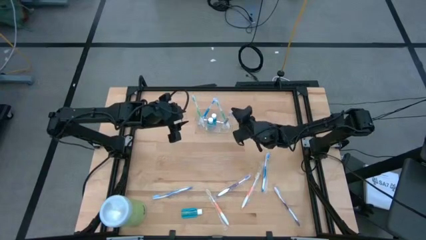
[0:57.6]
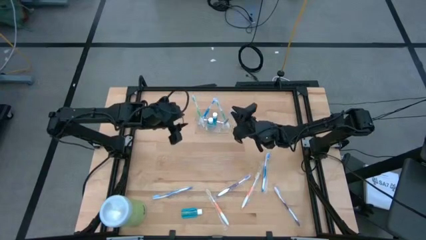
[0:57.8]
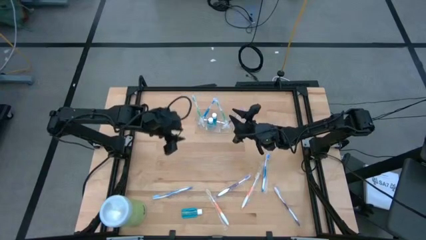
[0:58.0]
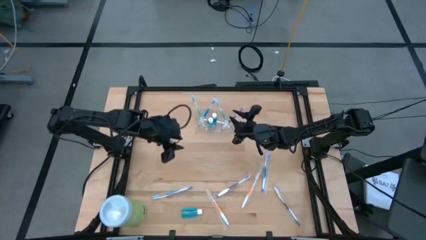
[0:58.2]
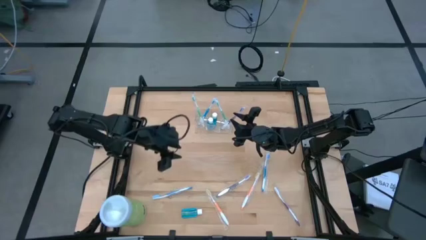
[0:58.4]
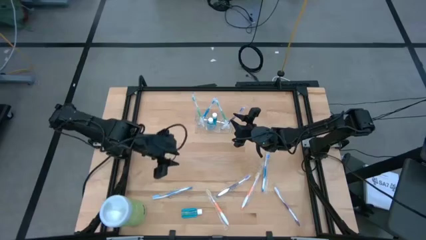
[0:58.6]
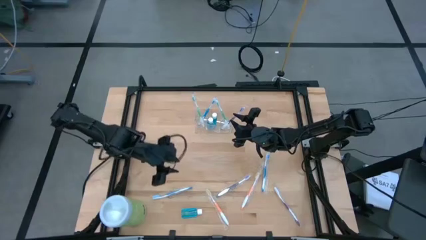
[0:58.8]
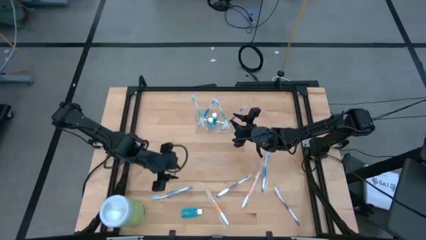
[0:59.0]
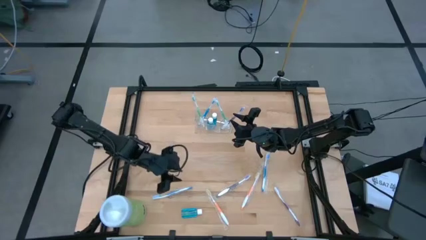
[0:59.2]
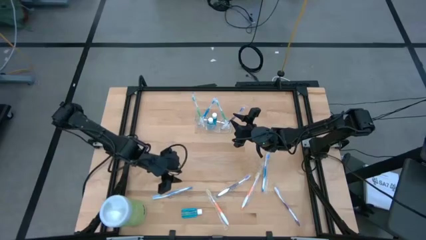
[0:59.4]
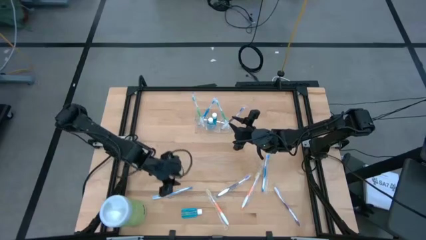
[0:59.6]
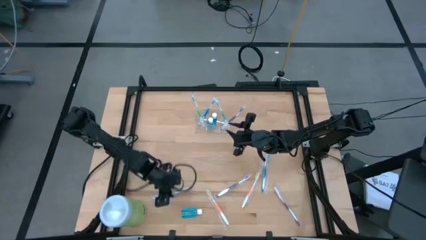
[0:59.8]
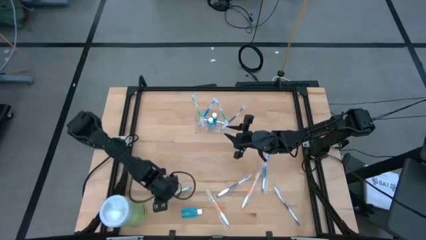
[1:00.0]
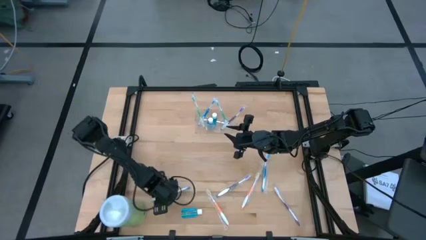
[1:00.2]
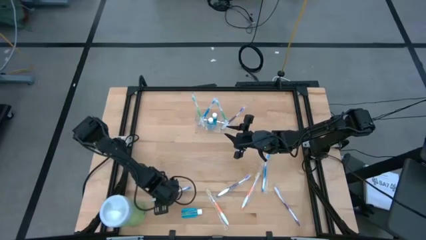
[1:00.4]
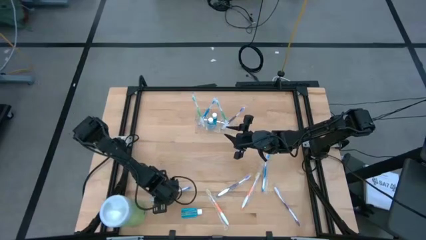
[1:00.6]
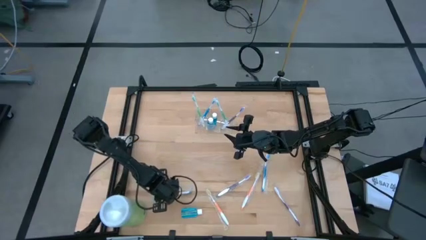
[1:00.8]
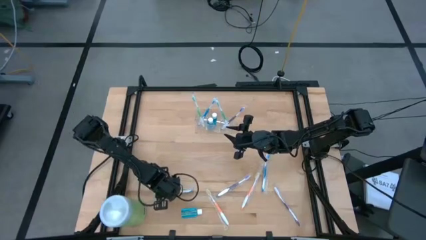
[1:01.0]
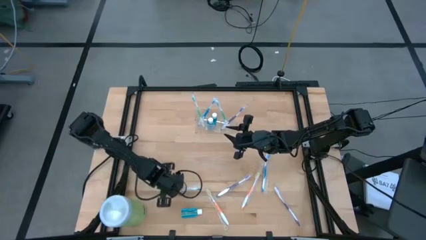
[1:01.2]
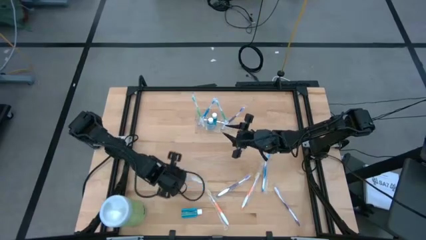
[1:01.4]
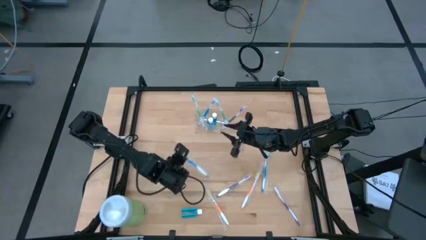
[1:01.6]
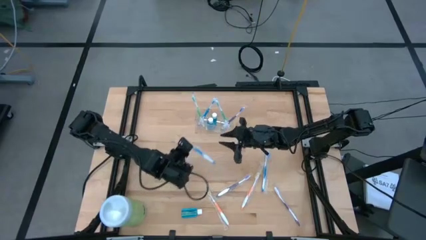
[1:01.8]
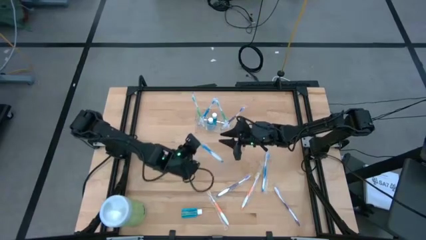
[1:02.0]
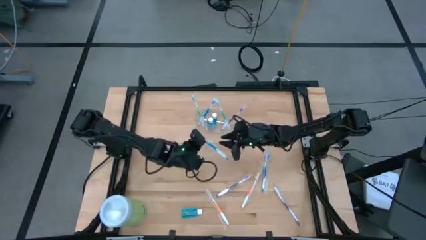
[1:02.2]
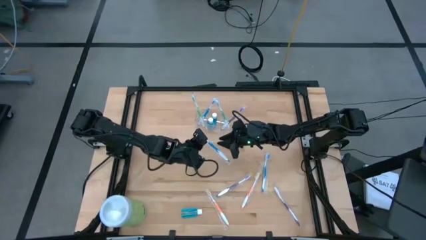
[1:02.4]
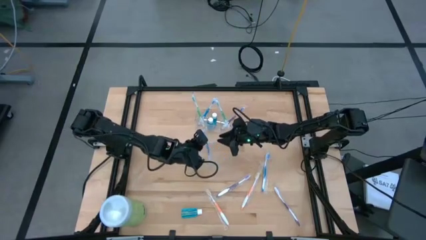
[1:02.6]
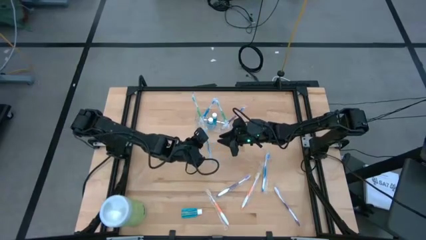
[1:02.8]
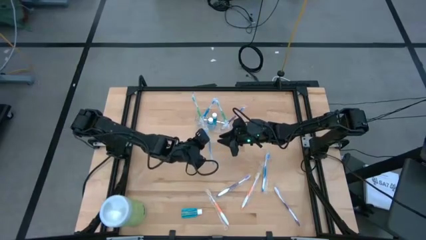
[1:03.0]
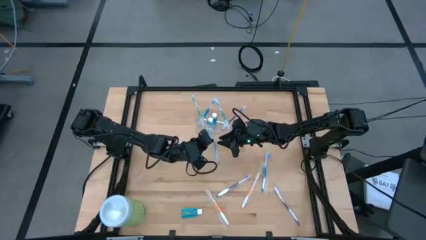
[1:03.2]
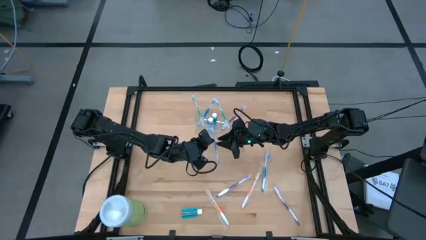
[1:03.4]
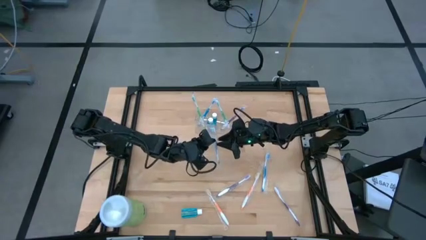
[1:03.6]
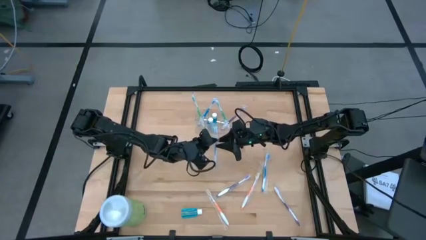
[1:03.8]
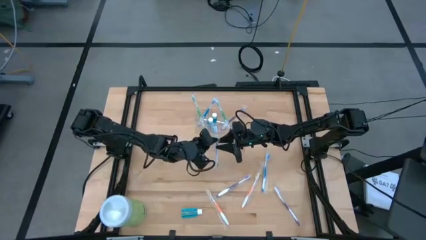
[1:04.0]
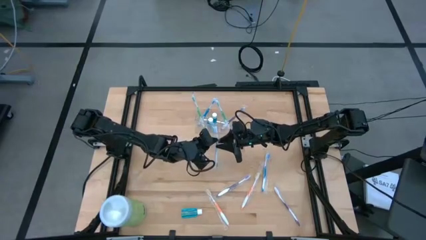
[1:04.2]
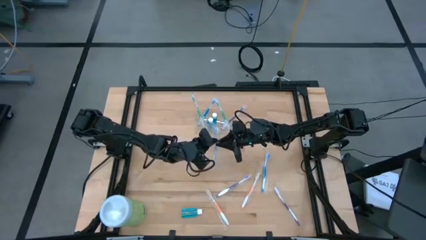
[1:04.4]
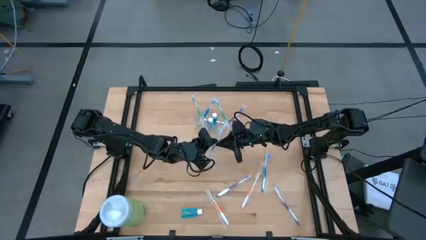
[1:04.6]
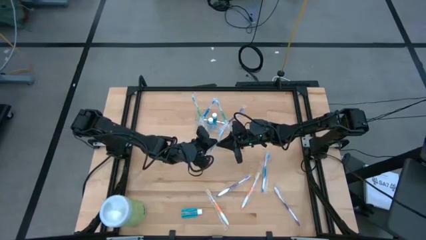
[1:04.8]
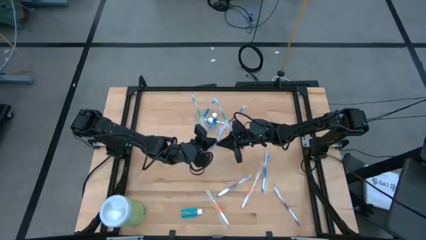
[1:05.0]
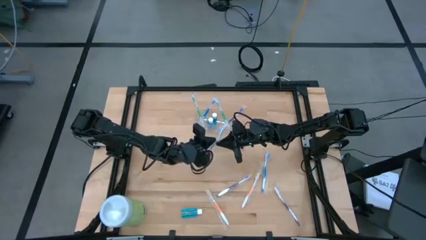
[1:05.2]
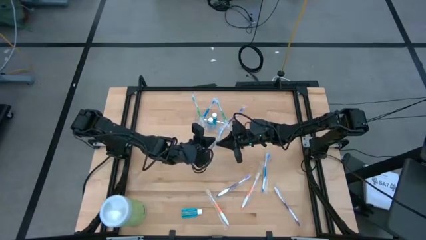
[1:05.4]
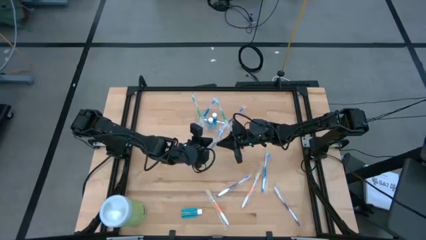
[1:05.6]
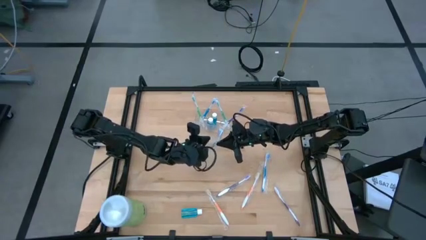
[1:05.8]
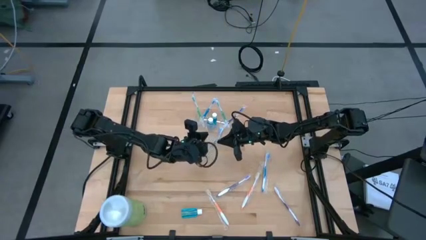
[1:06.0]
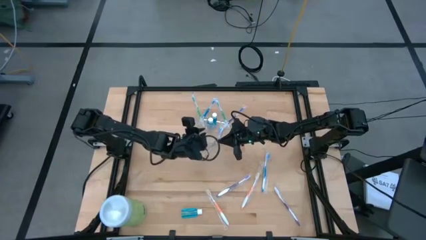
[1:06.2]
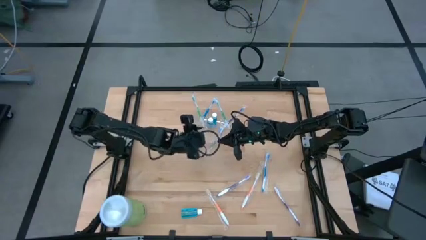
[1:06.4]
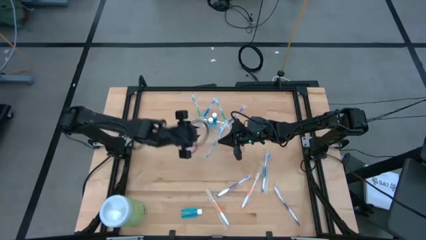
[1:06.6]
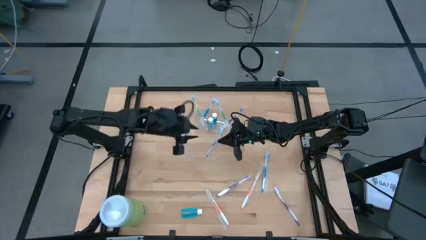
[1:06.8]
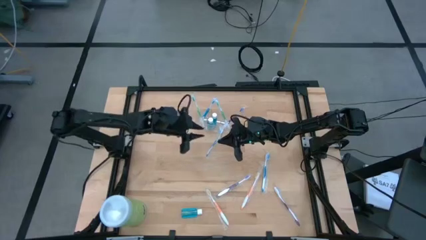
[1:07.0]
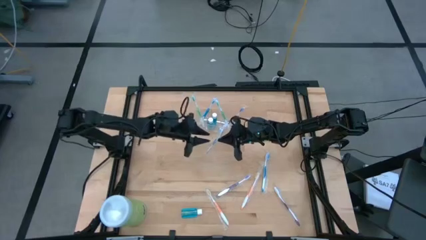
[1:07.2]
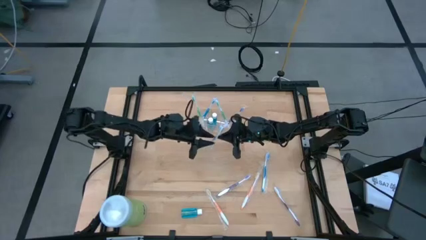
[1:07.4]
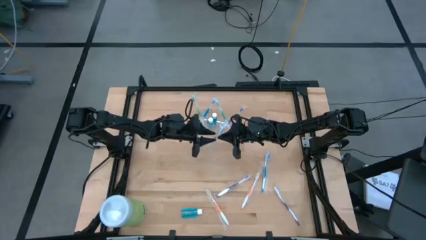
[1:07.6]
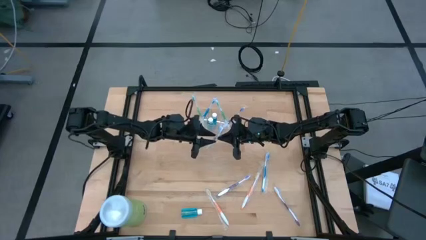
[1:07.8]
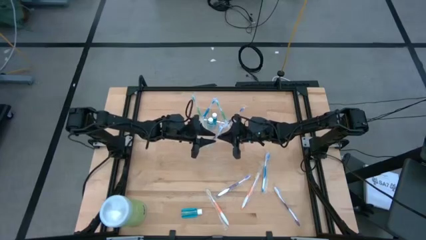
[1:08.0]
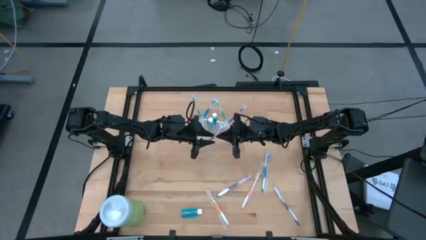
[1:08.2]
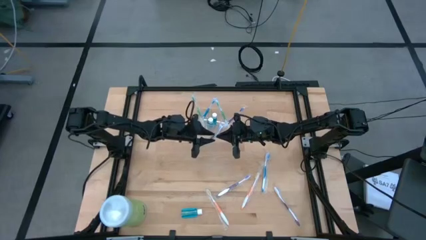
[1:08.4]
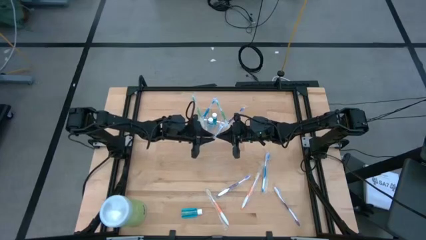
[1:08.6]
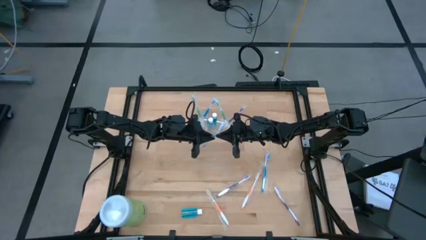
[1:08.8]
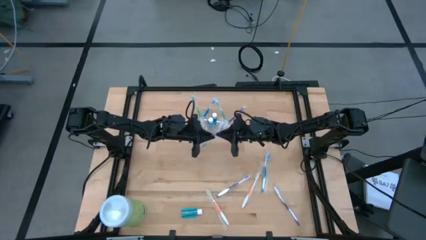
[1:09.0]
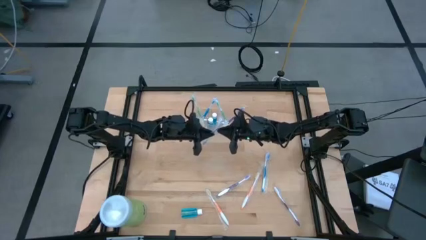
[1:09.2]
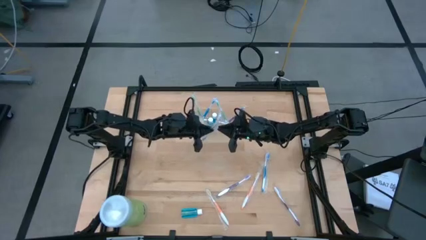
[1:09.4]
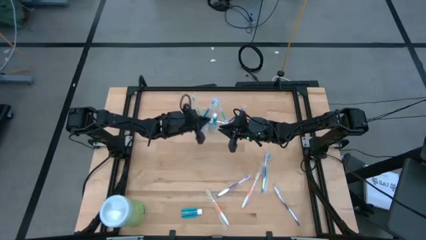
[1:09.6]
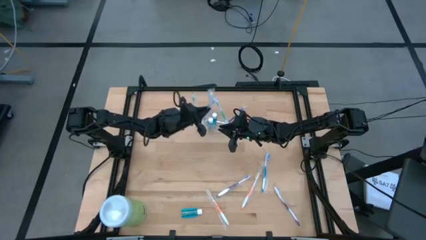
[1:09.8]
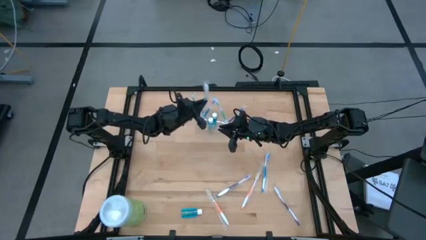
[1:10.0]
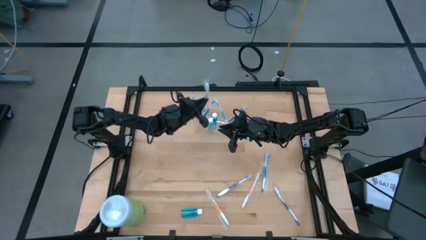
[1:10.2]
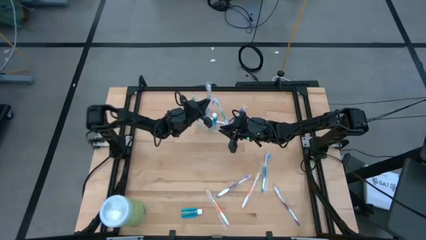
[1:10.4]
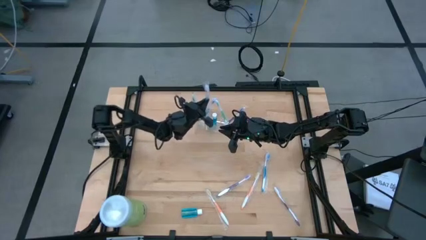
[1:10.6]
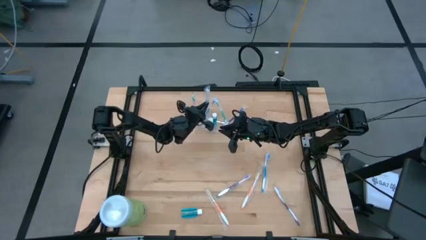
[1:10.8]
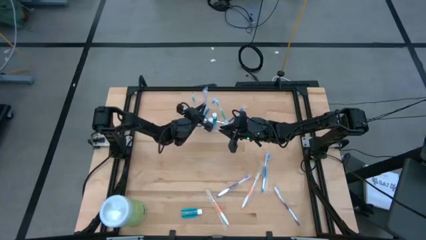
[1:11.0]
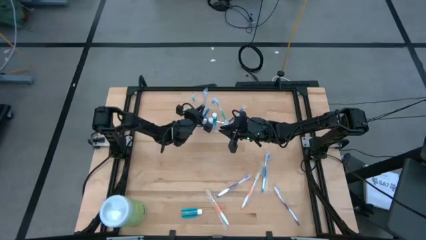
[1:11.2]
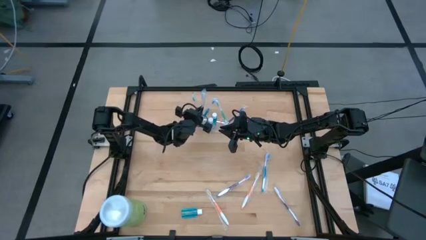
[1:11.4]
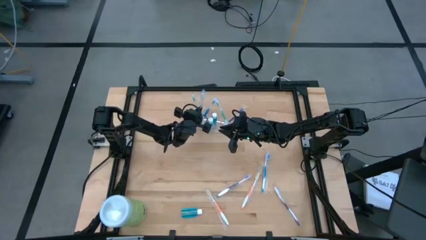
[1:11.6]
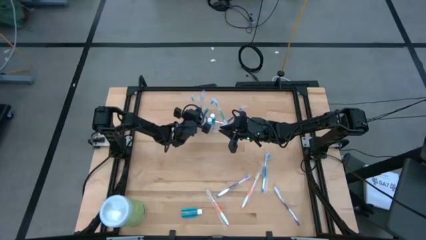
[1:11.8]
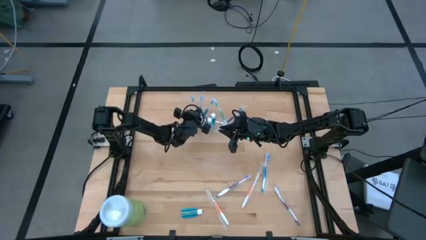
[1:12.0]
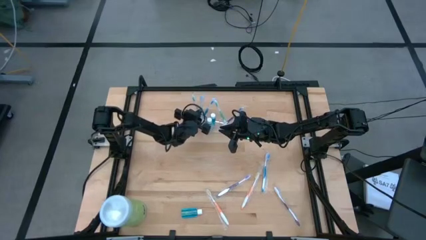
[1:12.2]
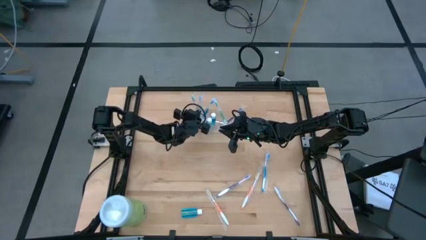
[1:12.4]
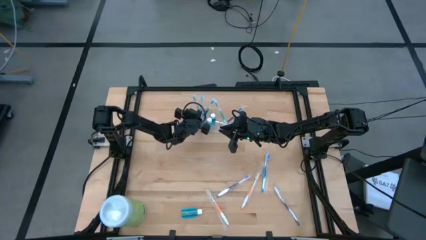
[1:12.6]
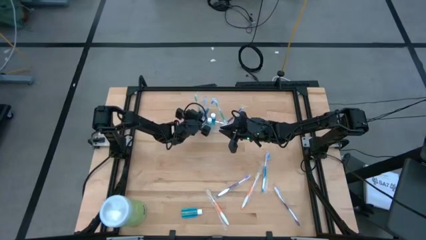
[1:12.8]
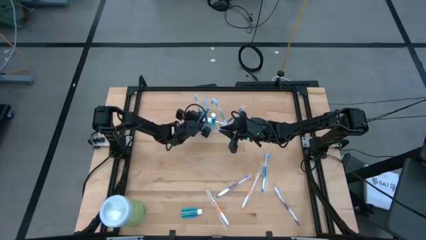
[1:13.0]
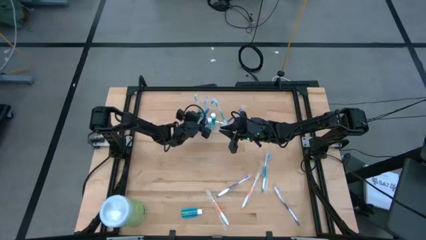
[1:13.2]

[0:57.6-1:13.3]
Task: Pick & Place toothbrushing station
Put the left blue toothbrush into the left section of the transparent organizer
